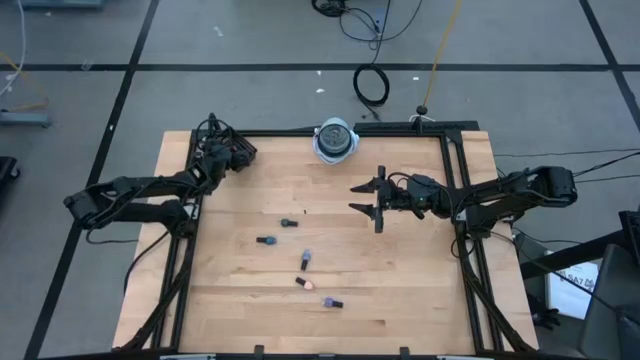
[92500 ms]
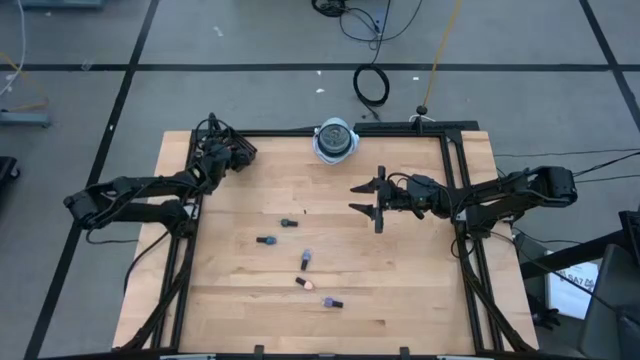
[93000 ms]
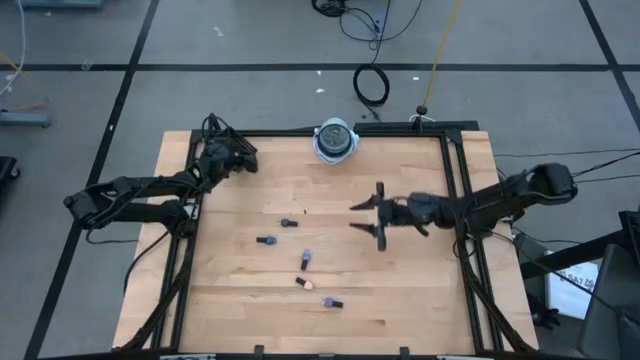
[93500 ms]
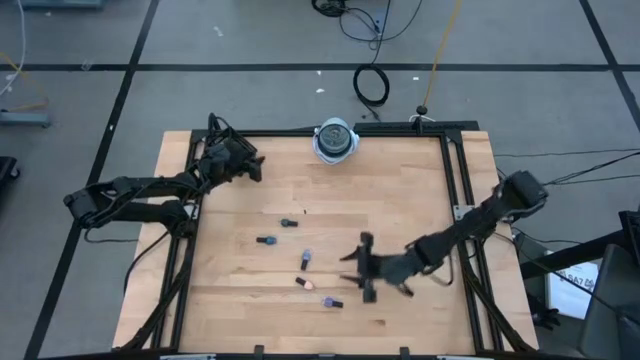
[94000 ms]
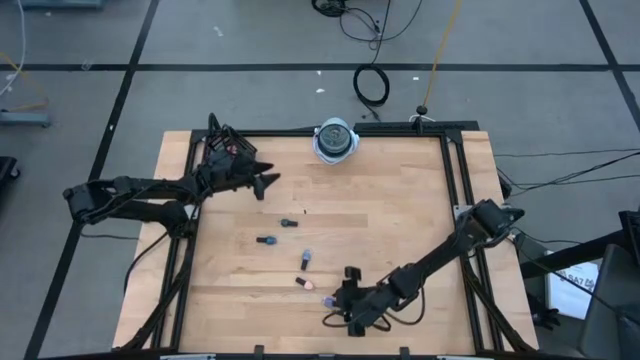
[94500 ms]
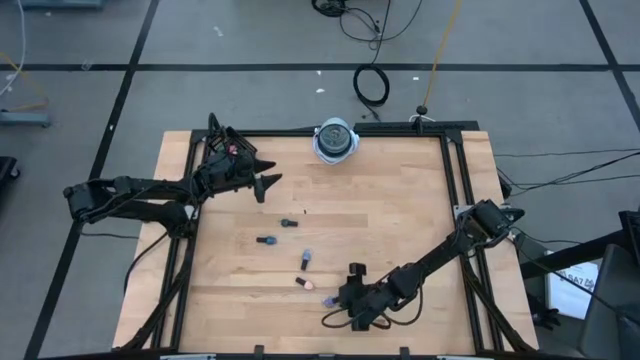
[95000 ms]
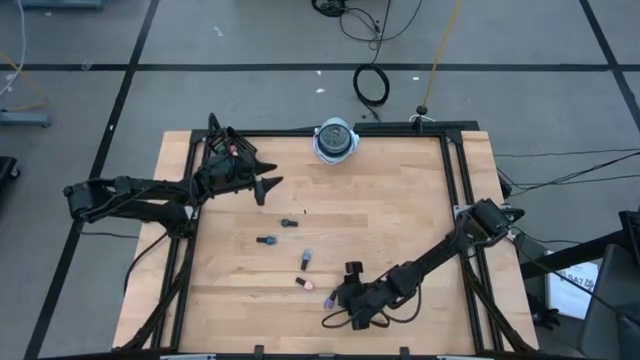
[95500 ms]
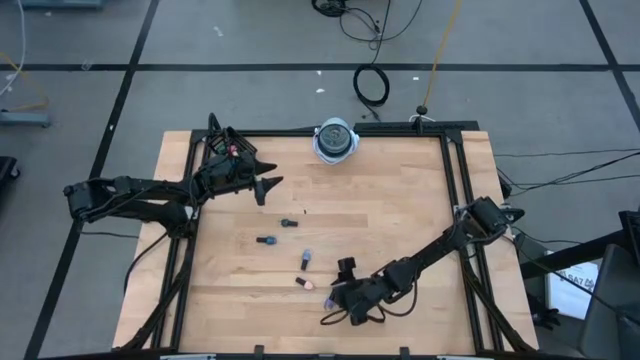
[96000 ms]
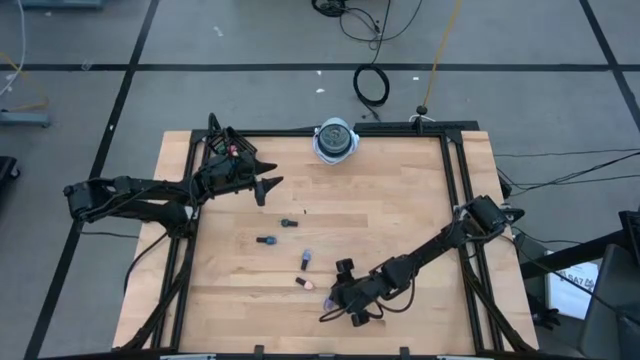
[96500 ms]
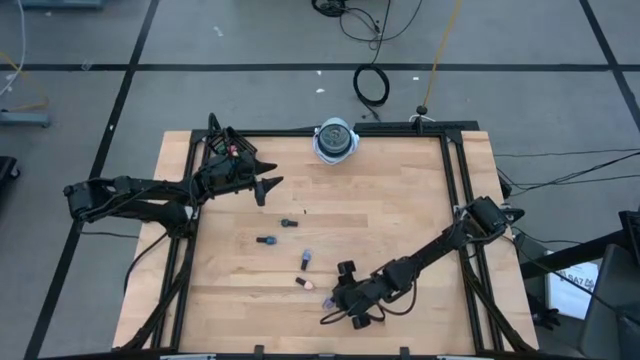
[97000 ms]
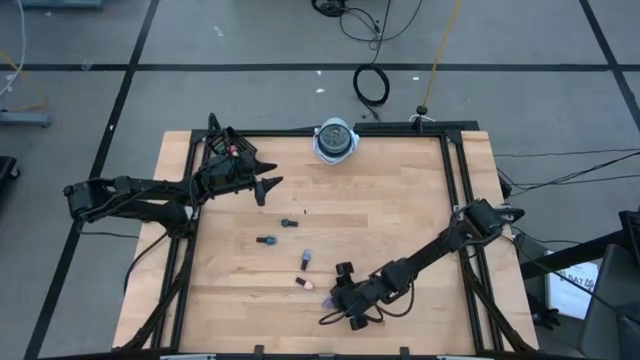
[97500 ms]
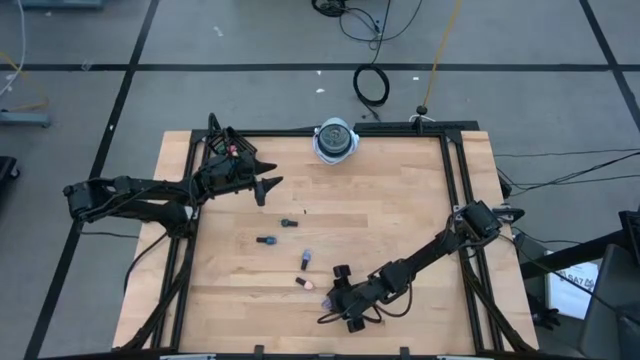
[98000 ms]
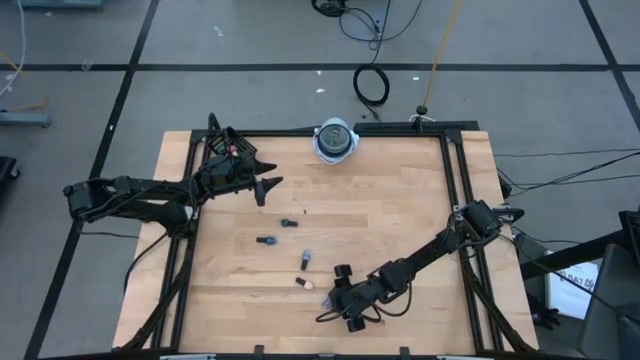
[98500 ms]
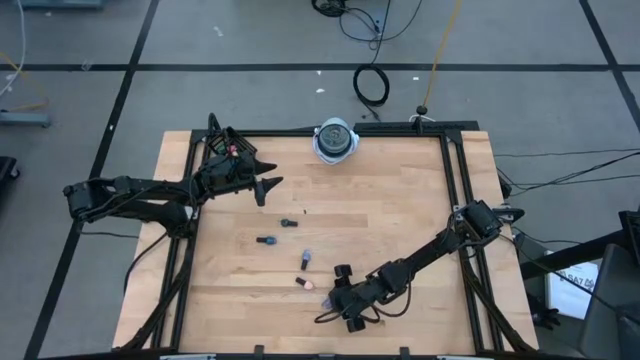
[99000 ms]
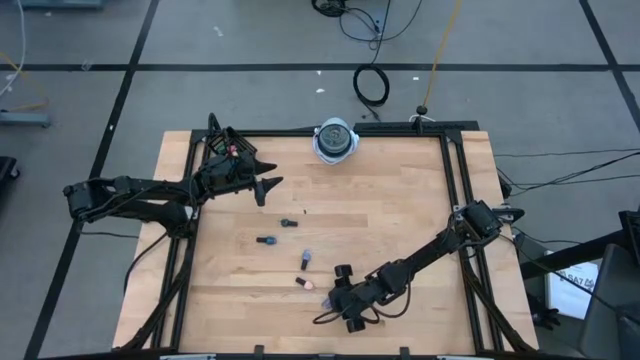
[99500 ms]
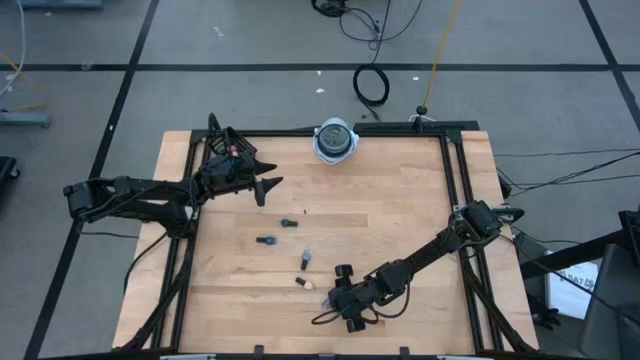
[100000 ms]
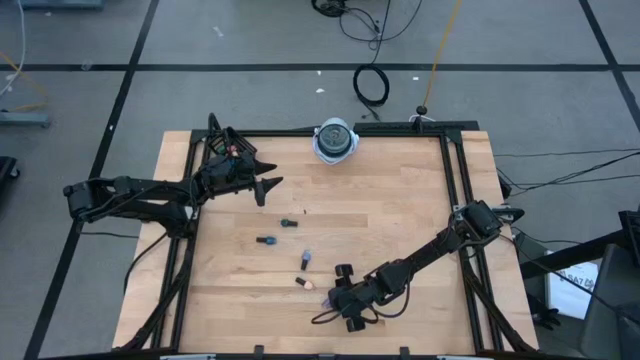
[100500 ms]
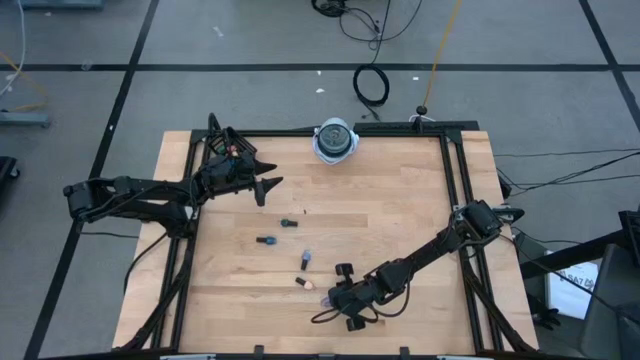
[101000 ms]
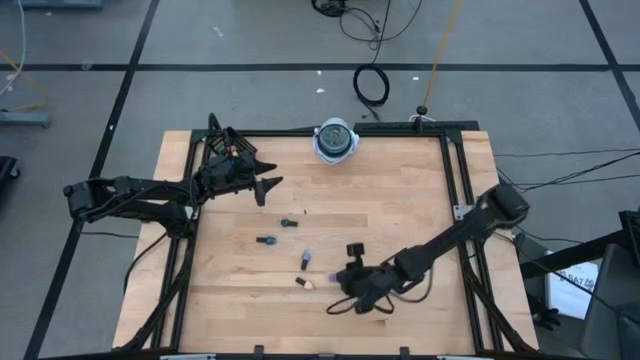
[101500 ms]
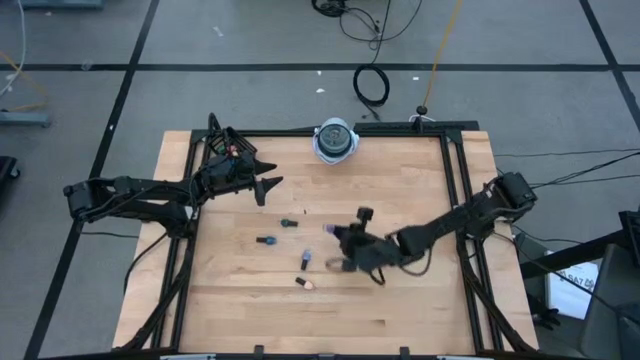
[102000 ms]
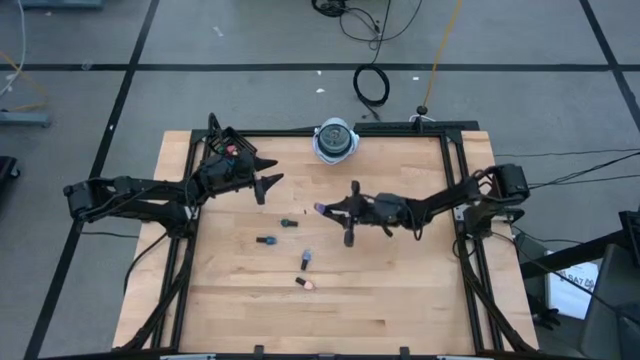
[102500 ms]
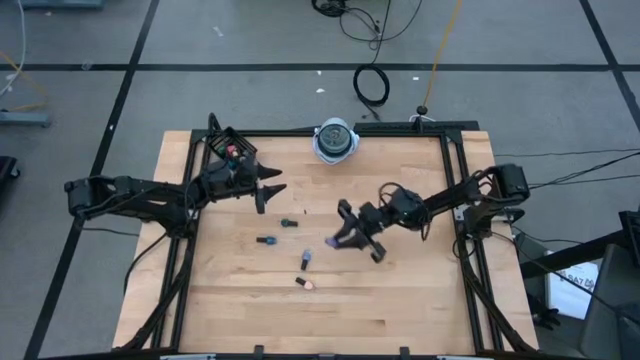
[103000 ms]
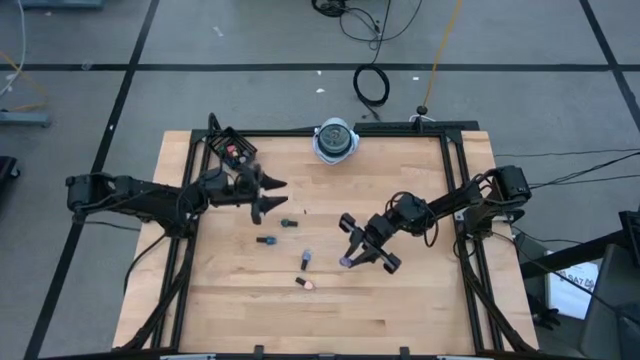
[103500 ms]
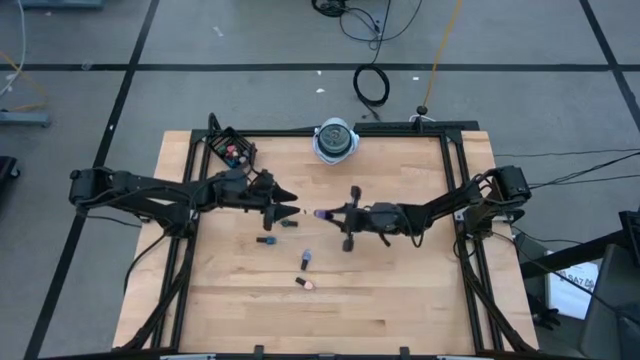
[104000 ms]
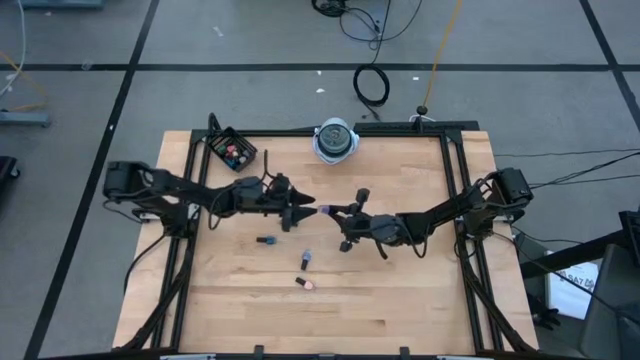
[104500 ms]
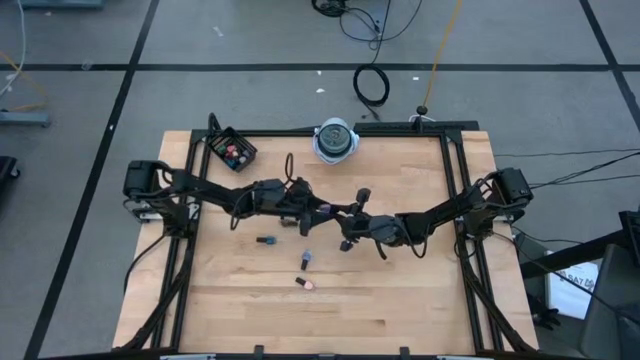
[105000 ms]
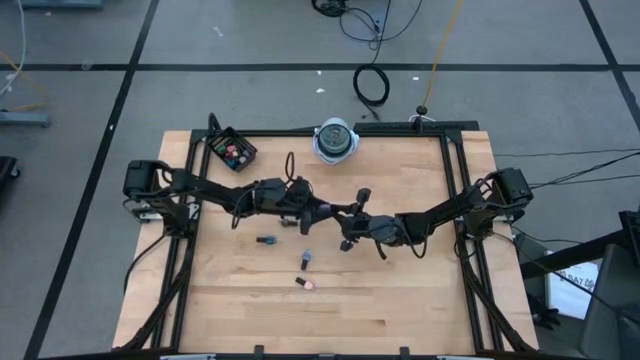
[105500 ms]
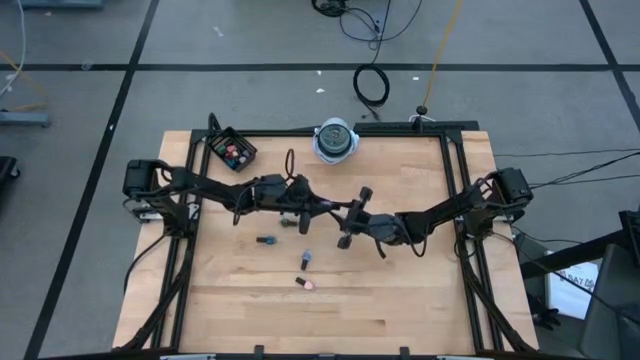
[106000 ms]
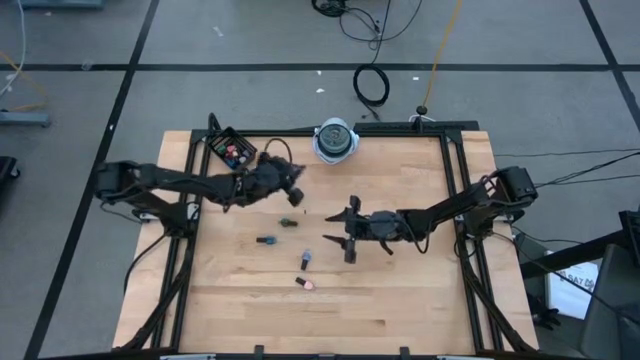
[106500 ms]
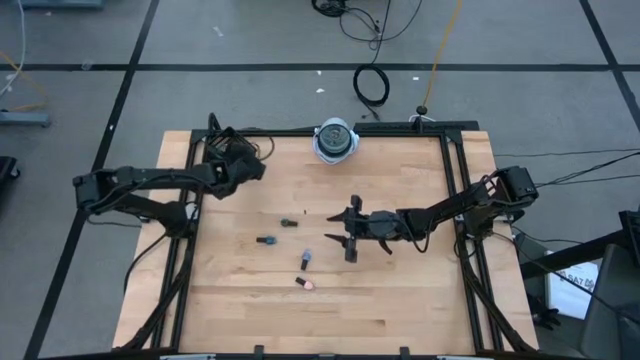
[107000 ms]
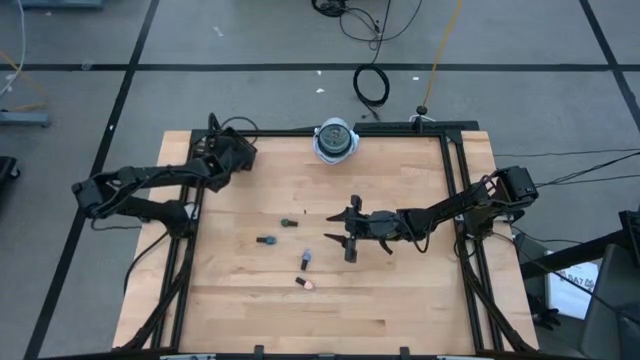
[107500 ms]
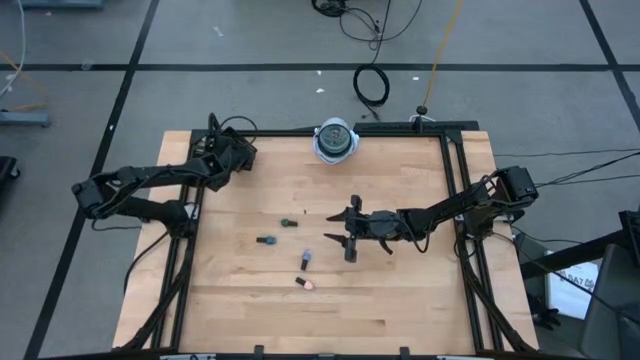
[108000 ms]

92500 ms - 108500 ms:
Task: Pick & Place Nail Polish
Put the violet nail polish bottle into the black bin

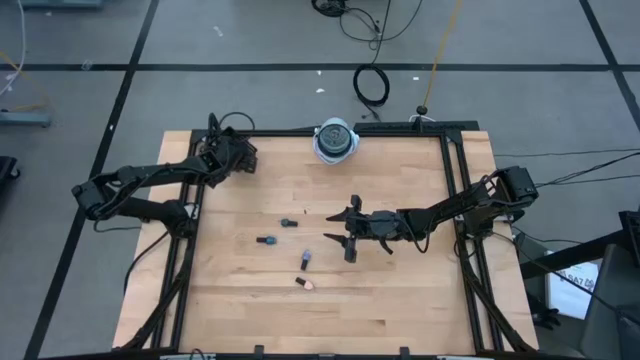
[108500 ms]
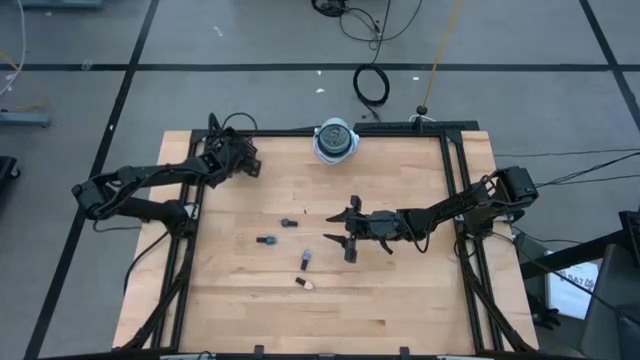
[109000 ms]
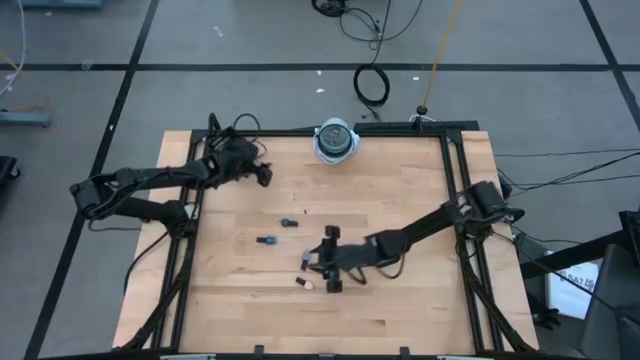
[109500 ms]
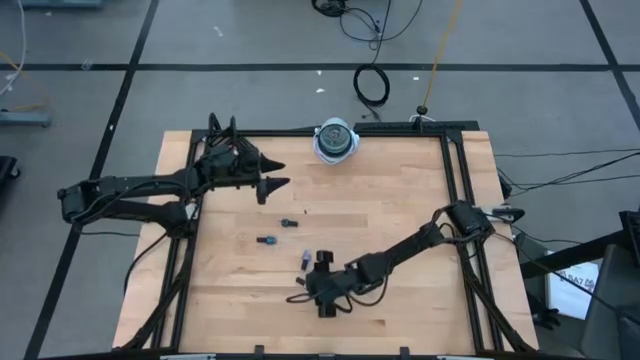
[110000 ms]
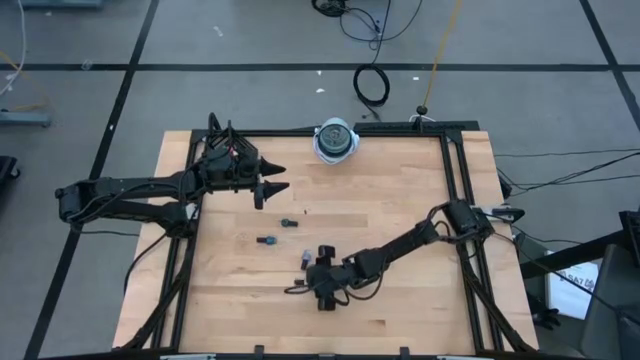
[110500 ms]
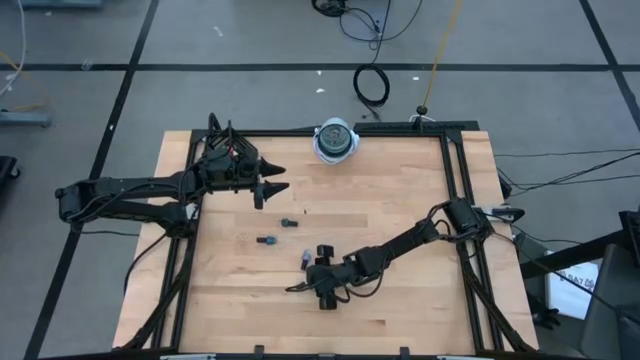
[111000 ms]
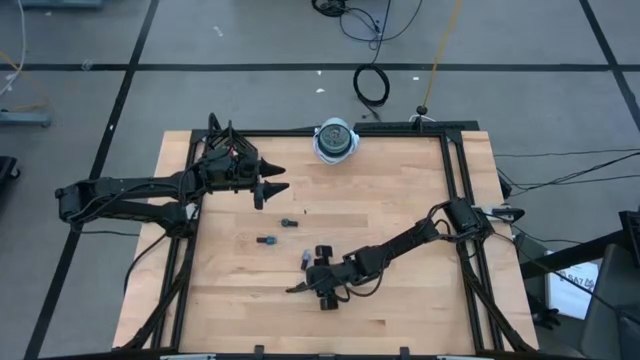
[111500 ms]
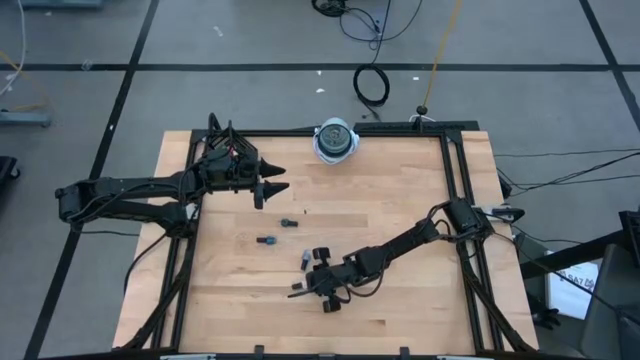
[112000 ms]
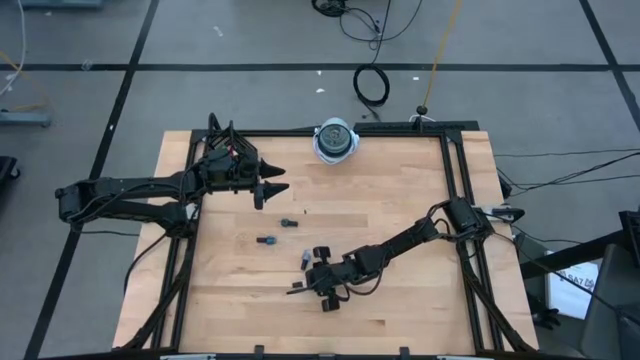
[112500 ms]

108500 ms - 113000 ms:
Put the light orange nail polish bottle into the black bin
